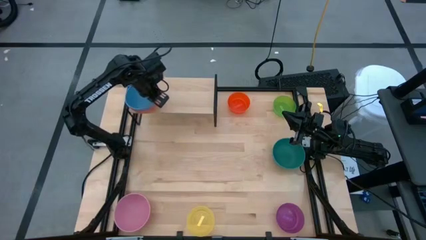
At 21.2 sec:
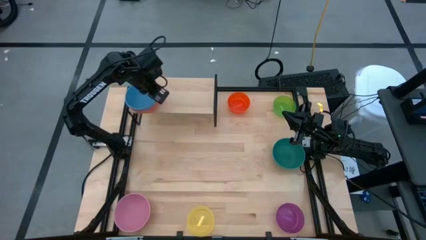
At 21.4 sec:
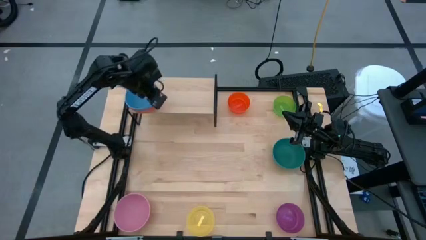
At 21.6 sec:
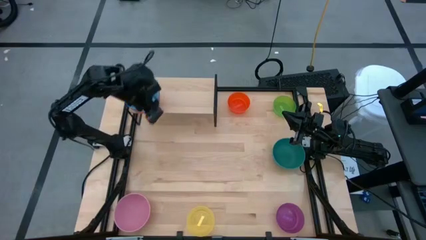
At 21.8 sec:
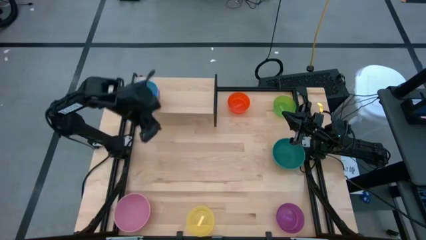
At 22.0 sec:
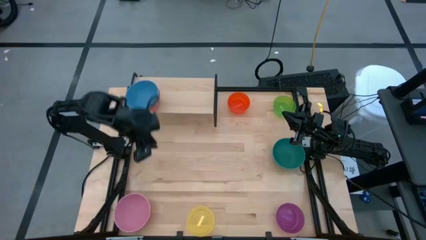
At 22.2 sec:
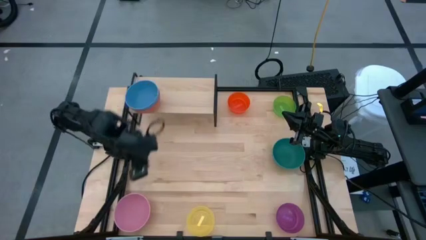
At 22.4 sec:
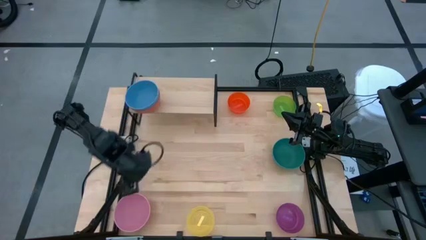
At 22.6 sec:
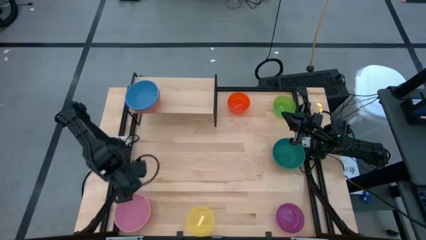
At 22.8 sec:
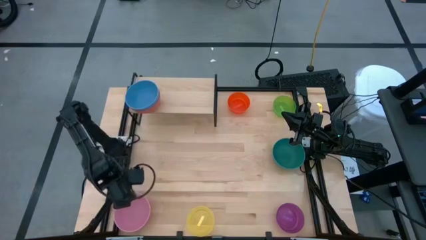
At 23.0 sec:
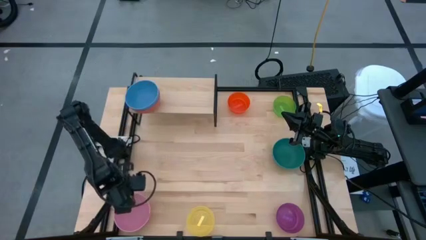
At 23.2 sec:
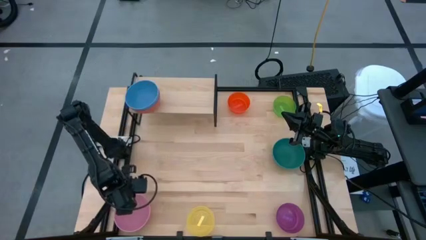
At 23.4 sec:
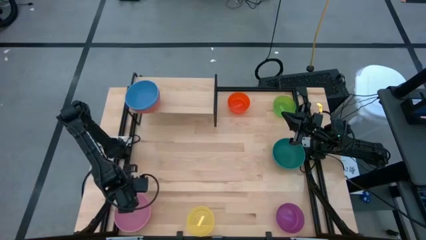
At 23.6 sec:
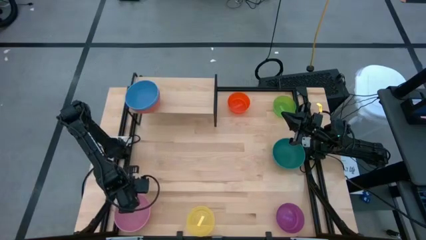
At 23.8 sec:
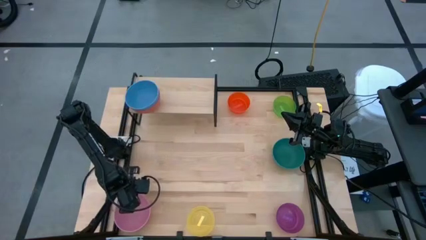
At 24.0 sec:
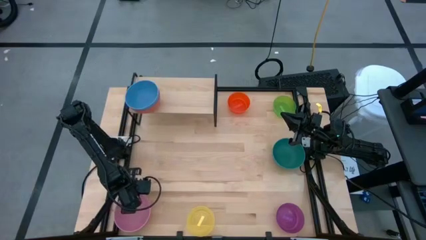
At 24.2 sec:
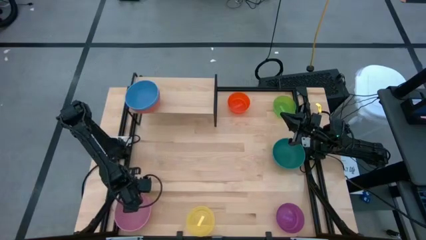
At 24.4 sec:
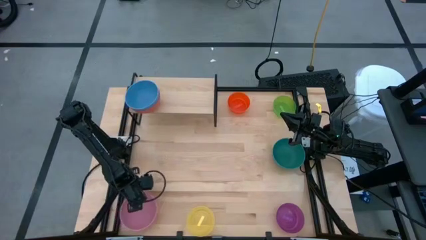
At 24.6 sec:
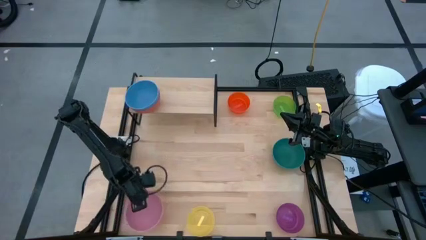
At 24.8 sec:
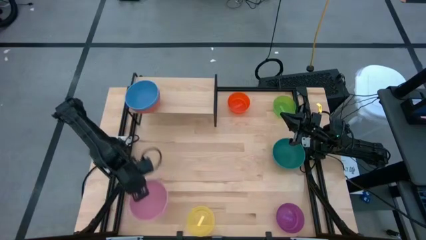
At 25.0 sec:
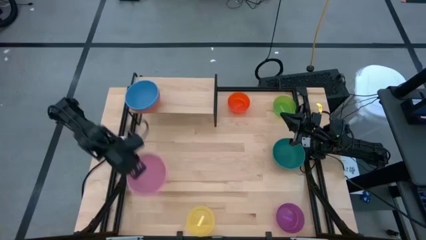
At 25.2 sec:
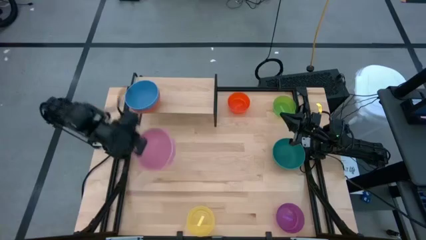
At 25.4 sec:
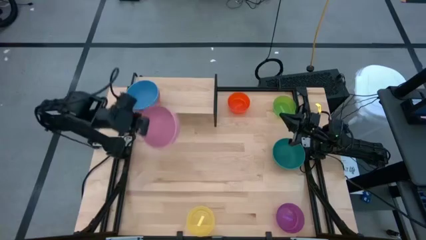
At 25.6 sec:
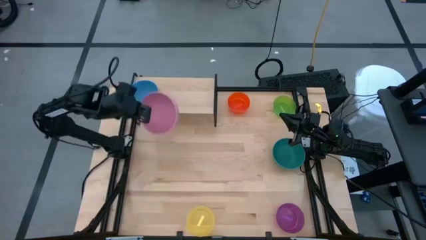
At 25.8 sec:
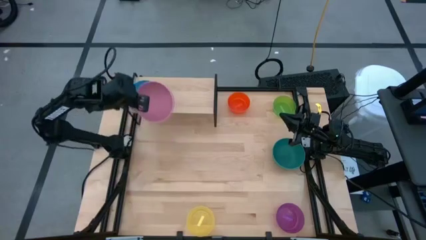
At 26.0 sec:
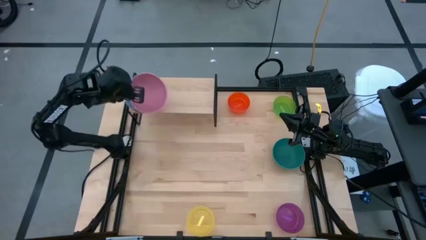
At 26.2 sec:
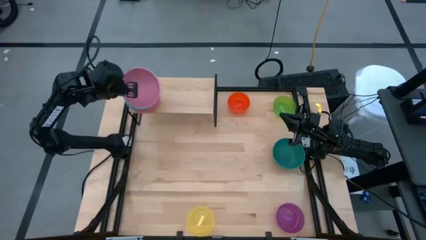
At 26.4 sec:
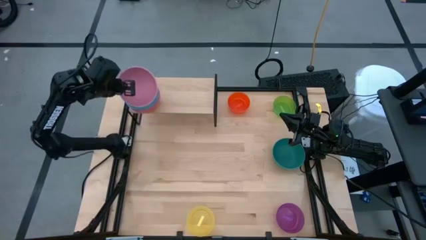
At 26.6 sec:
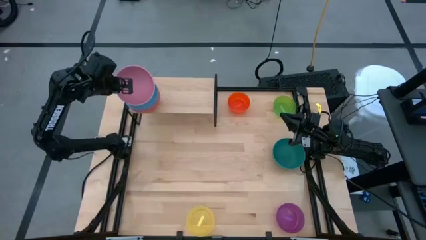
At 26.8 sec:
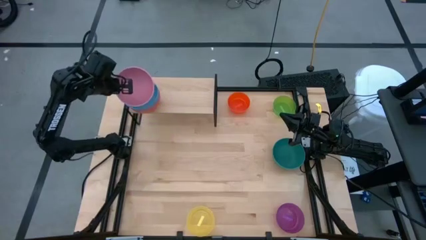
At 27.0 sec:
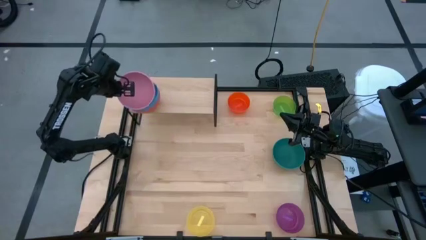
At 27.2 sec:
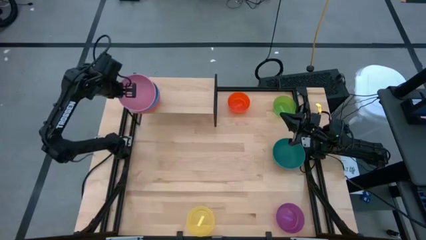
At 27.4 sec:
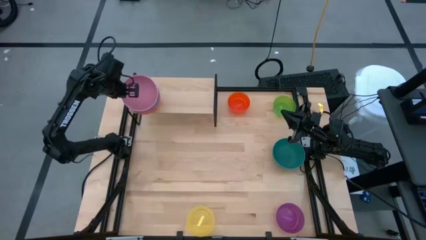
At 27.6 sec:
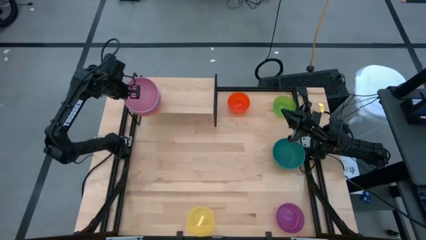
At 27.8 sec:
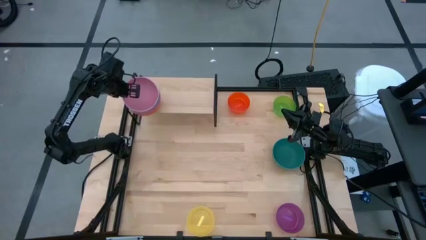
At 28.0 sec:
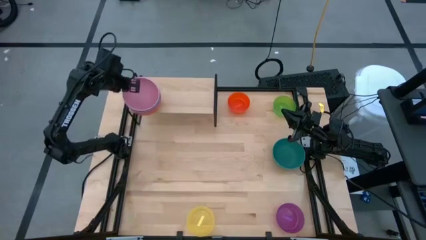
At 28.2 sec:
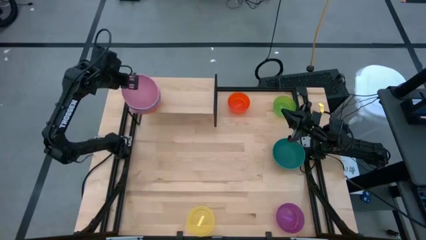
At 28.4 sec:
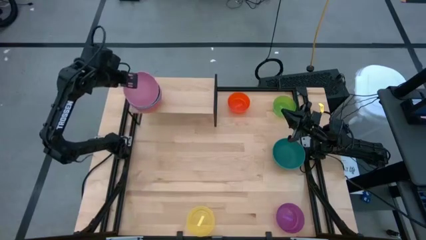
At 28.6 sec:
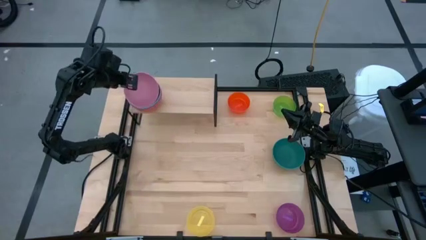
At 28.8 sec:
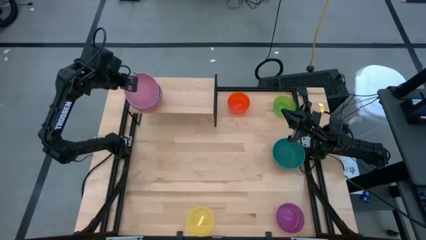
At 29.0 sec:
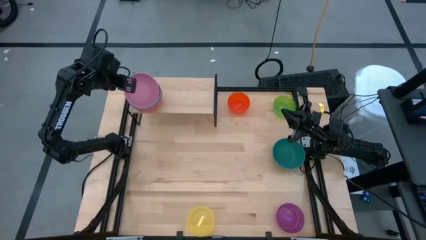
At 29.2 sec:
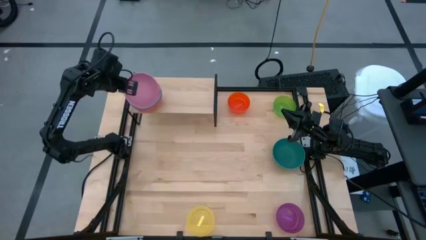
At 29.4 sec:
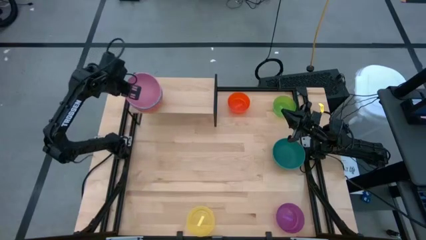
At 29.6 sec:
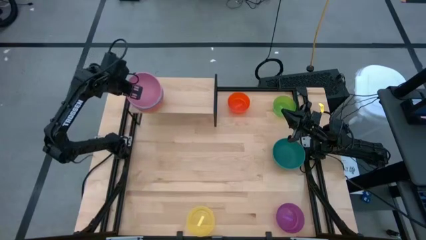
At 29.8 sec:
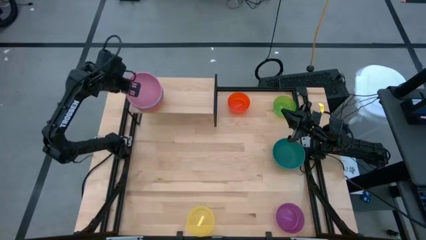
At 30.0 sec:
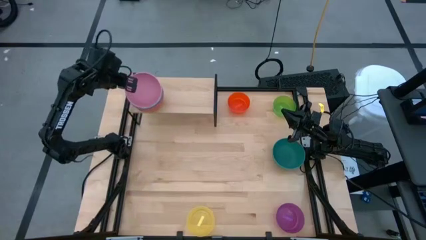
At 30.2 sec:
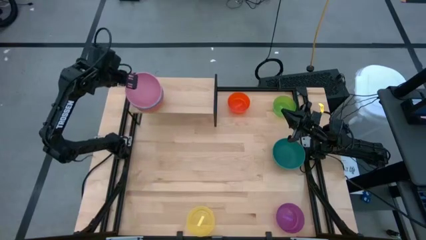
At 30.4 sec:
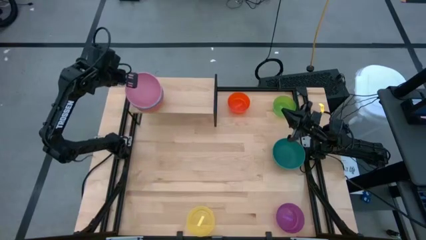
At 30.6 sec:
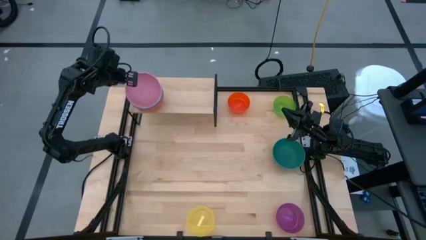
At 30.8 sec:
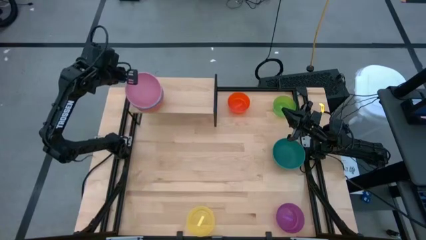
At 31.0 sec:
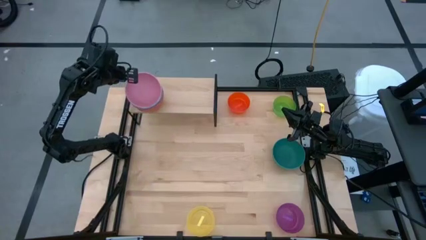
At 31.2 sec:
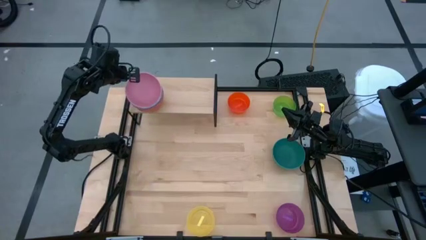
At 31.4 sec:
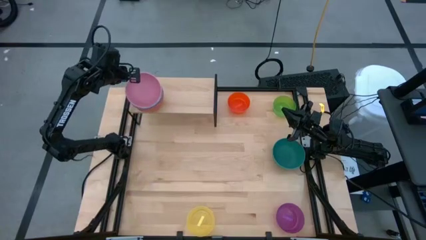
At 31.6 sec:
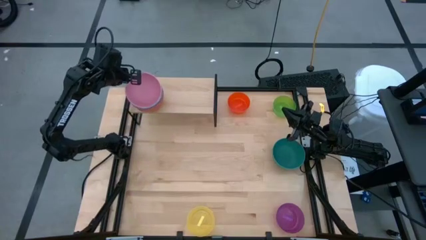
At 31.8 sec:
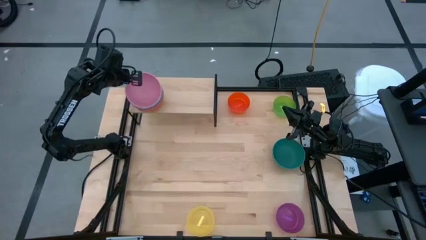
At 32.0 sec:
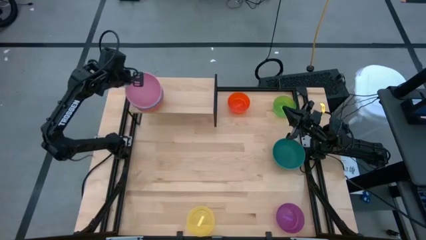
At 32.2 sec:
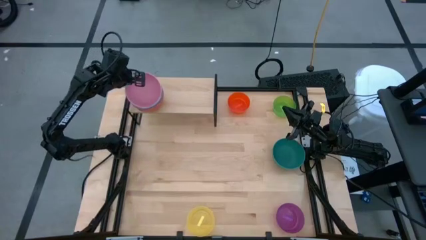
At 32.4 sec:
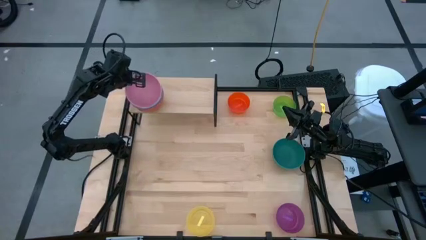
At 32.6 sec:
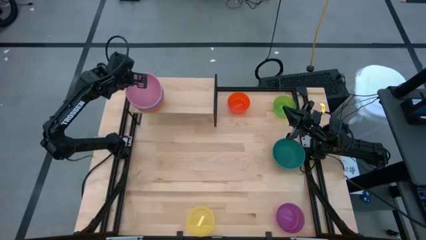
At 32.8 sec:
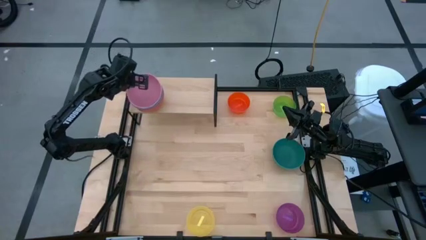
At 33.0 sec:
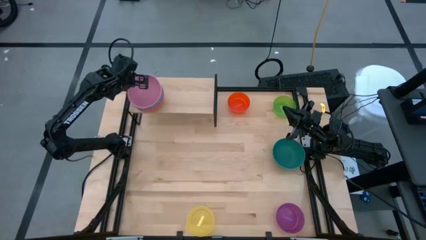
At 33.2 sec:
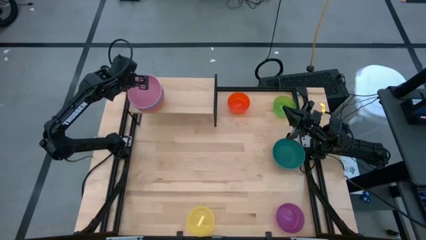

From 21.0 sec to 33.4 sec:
Task: Place and stack bowls onto a shelf
Stack the pink bowl on top of the blue bowl on the shelf
